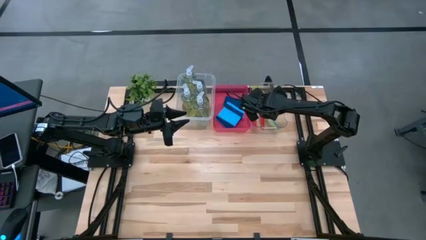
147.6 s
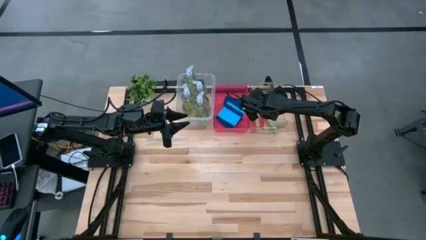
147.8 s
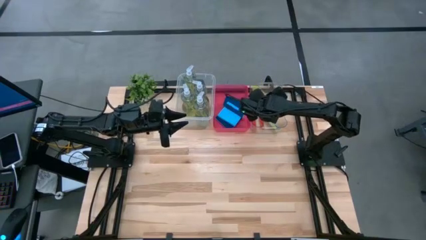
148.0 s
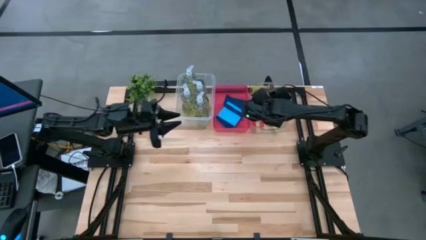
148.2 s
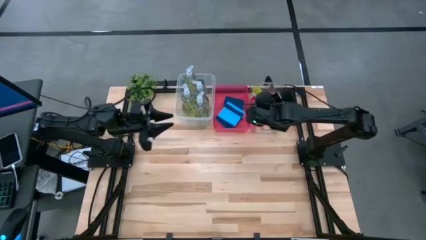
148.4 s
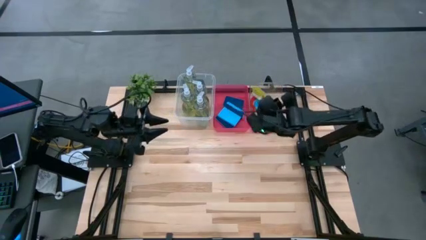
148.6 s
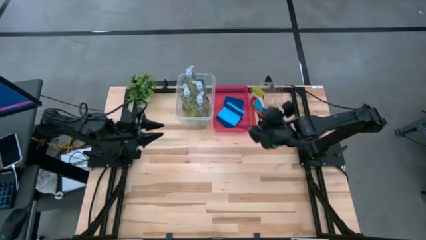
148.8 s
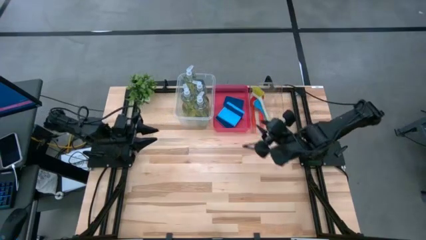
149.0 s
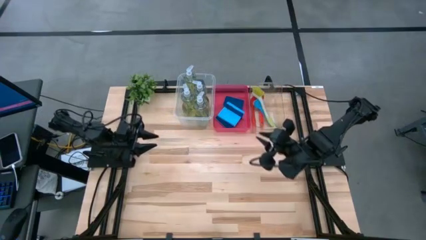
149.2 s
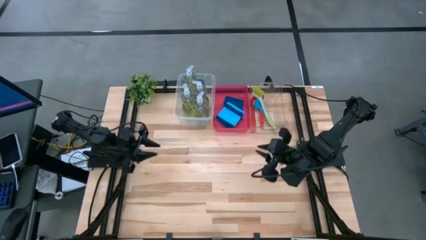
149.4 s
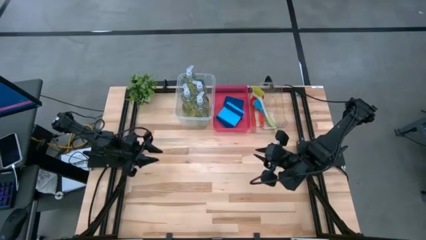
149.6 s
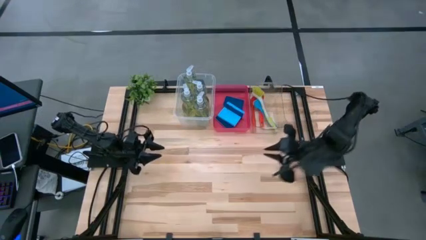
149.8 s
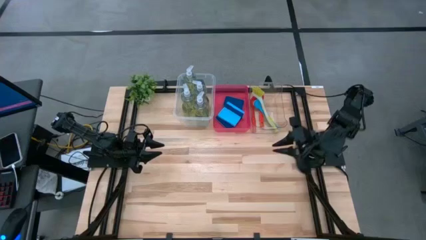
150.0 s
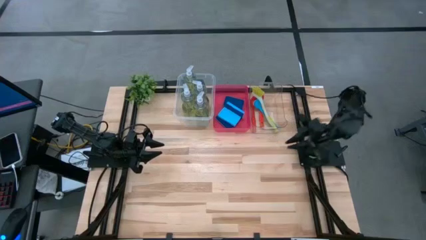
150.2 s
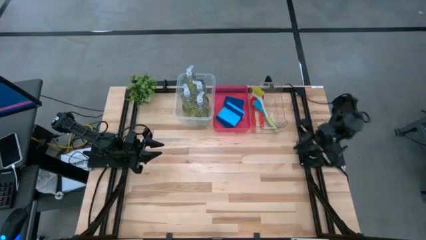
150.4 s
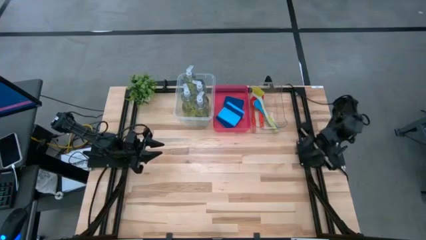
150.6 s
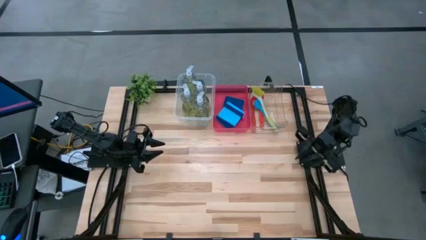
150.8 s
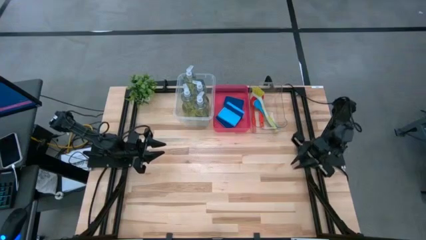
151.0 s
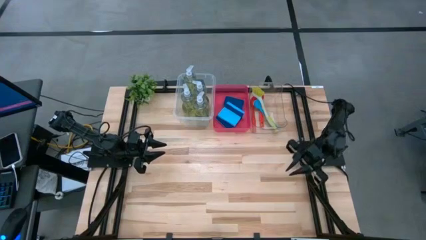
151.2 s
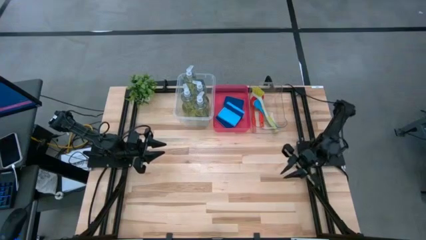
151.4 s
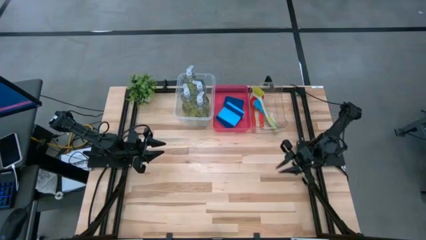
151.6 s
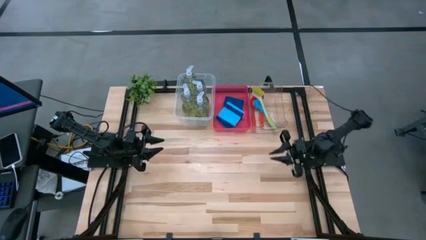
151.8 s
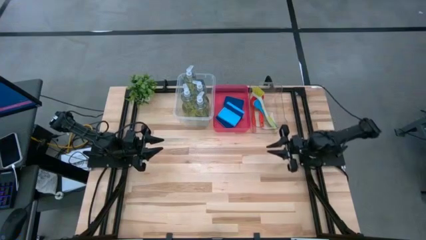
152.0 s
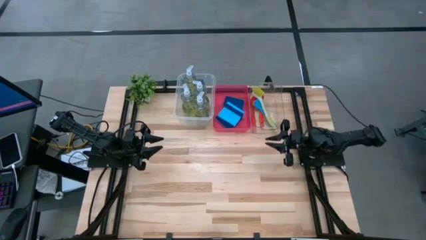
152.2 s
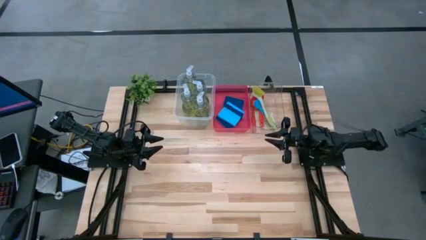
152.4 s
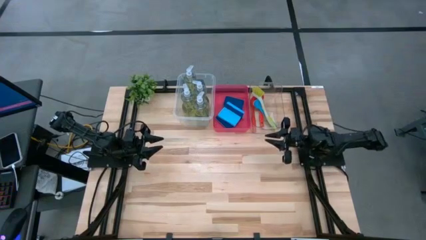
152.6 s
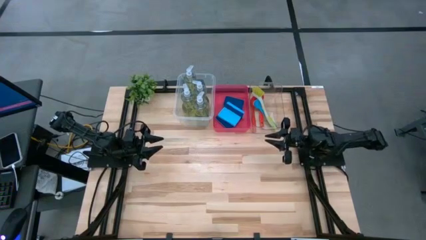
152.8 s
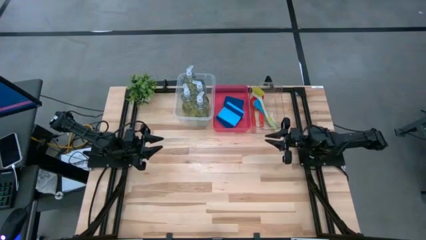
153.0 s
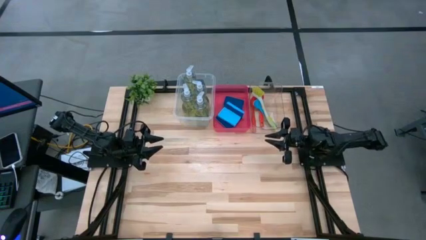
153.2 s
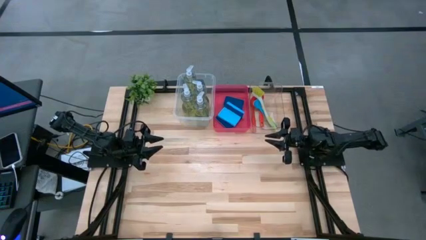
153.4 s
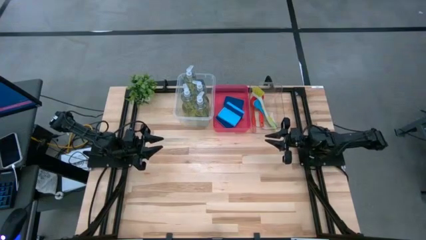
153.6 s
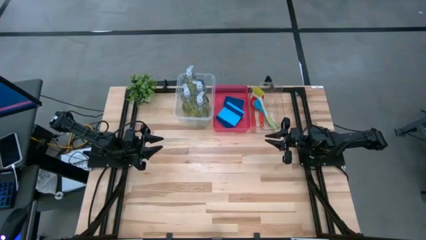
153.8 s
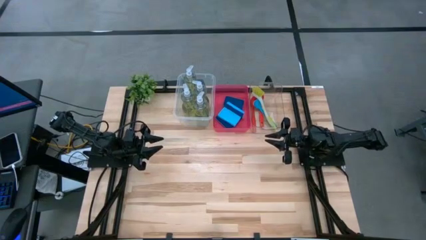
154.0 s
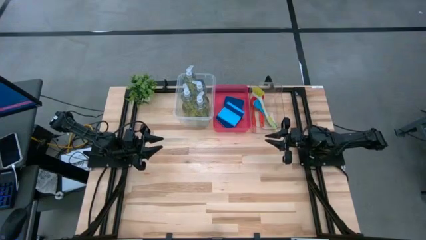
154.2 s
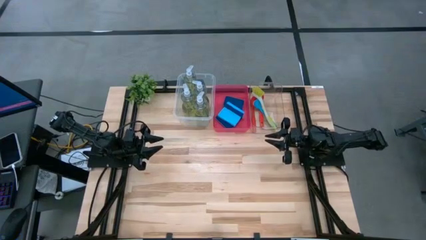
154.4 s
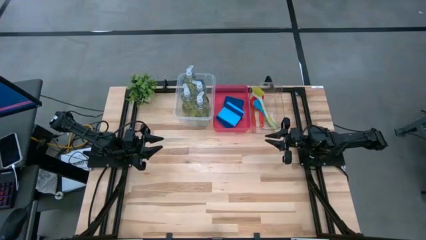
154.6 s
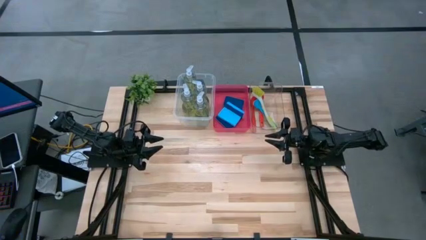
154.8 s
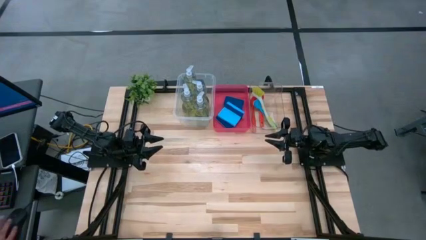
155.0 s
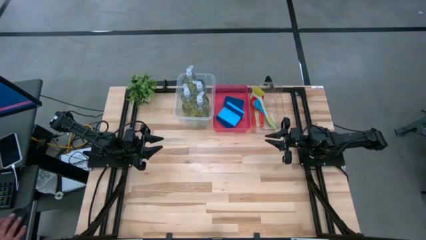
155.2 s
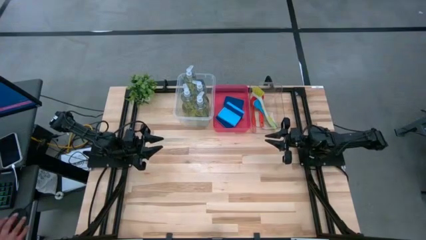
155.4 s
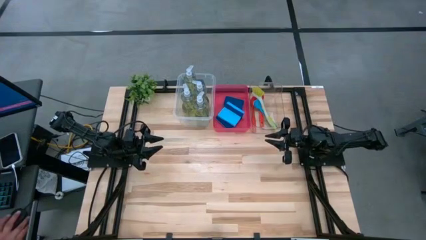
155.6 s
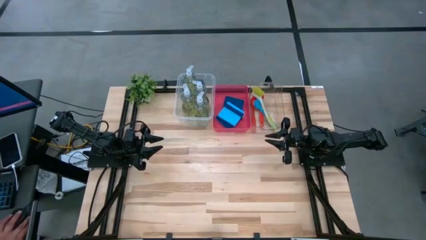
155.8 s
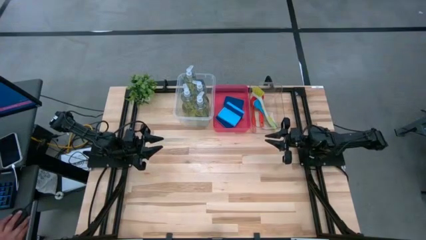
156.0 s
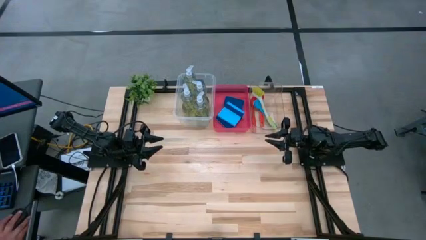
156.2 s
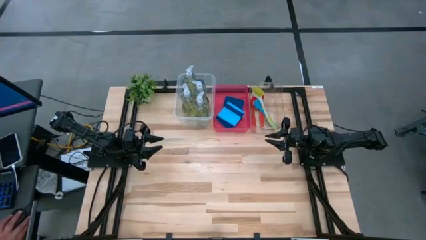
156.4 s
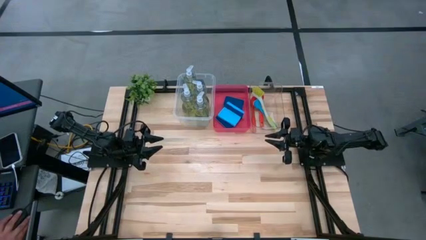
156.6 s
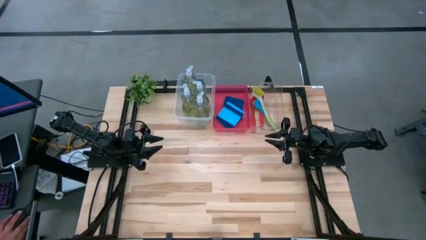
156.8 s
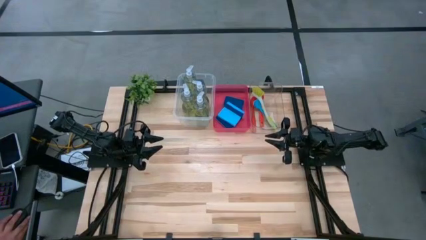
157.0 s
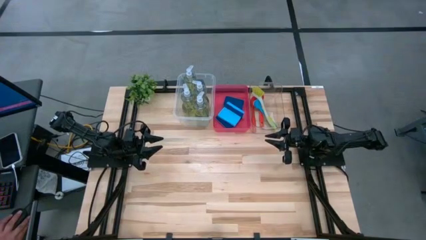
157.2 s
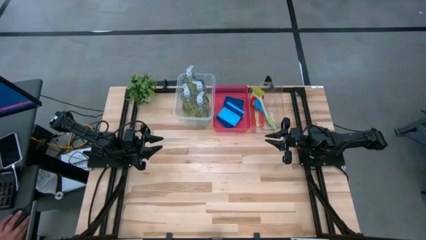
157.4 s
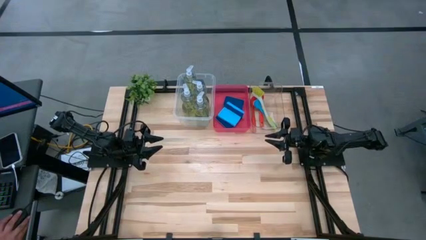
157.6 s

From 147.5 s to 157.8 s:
Task: Pick & Place Kitchen Sink Supplies
Return to home position

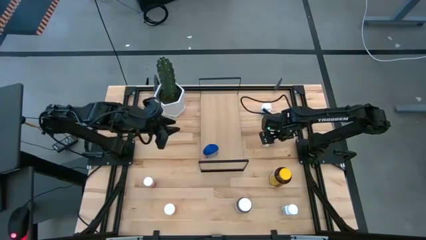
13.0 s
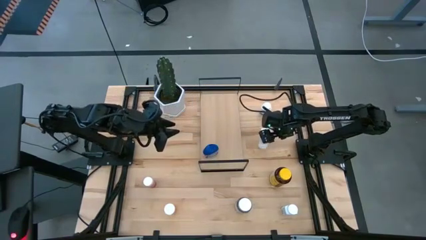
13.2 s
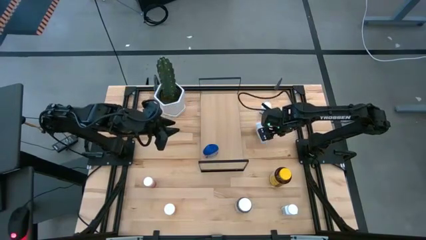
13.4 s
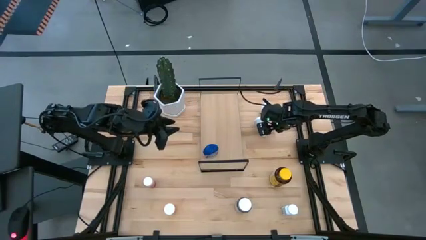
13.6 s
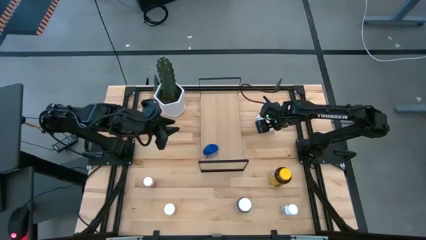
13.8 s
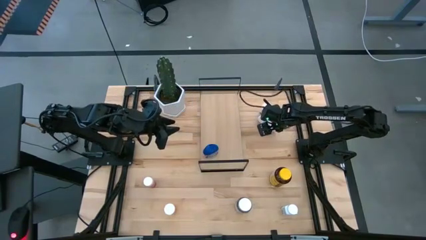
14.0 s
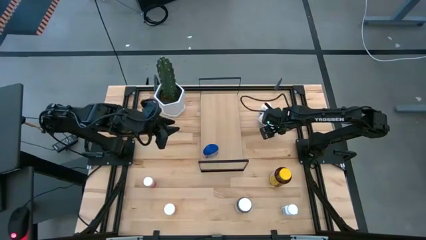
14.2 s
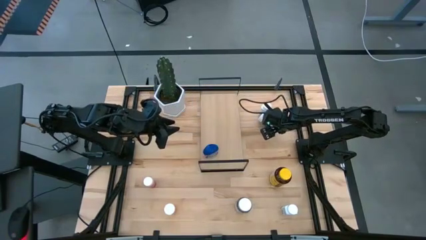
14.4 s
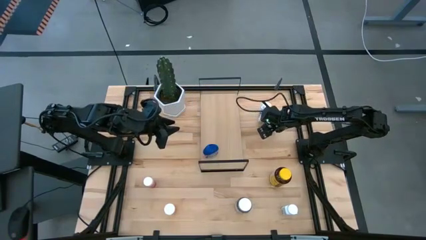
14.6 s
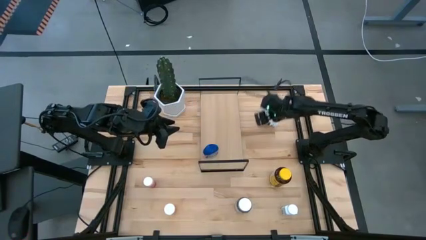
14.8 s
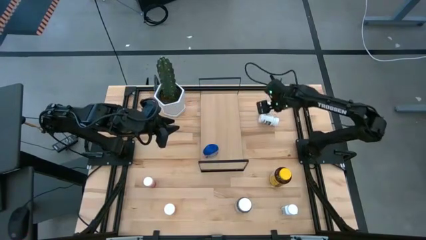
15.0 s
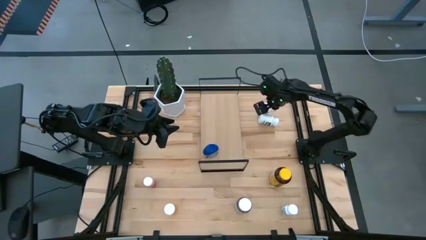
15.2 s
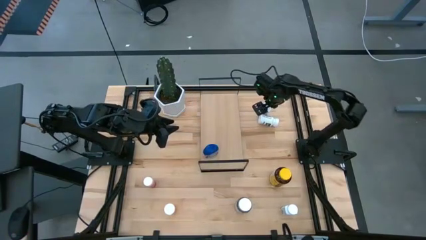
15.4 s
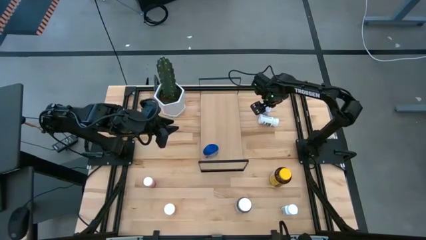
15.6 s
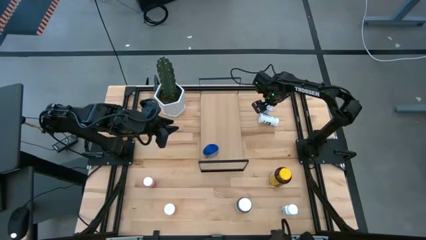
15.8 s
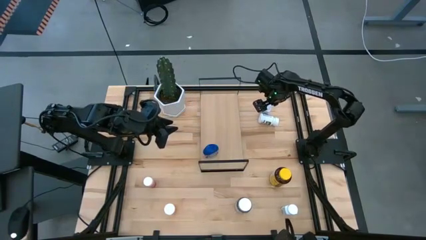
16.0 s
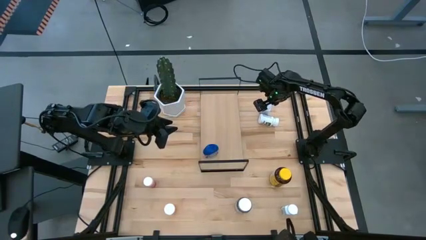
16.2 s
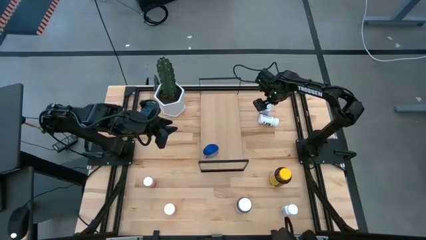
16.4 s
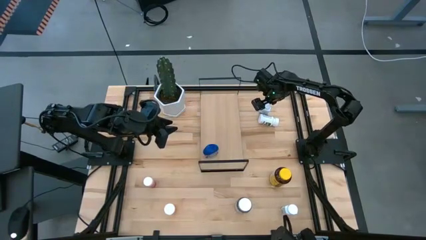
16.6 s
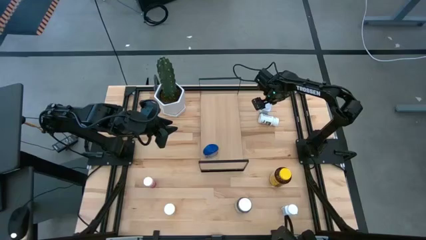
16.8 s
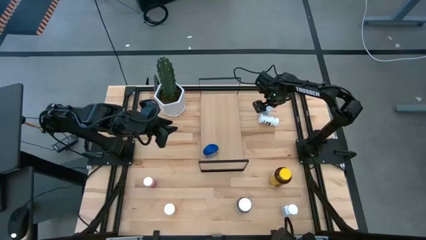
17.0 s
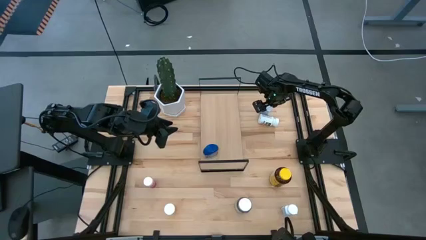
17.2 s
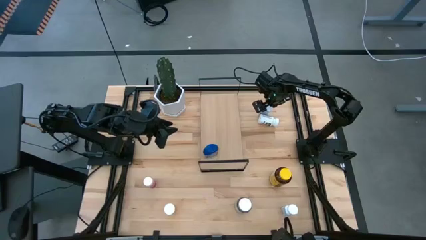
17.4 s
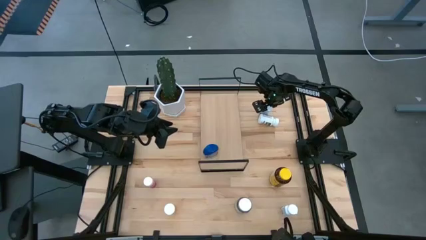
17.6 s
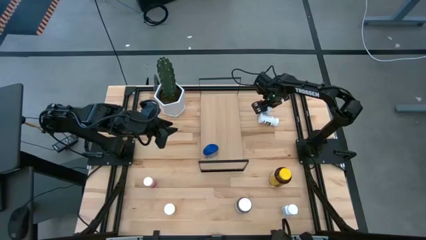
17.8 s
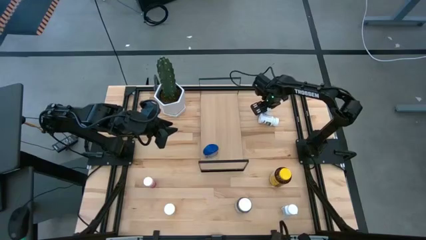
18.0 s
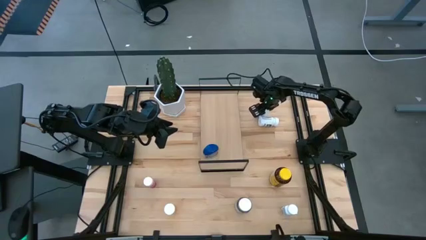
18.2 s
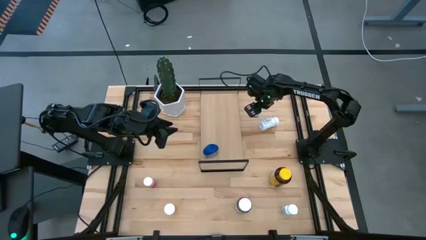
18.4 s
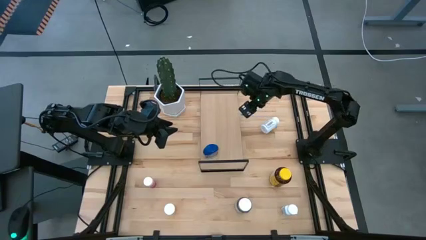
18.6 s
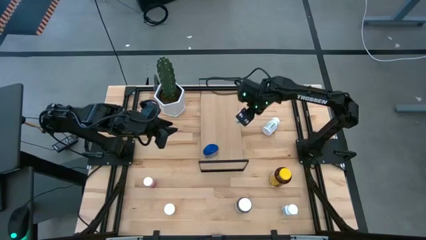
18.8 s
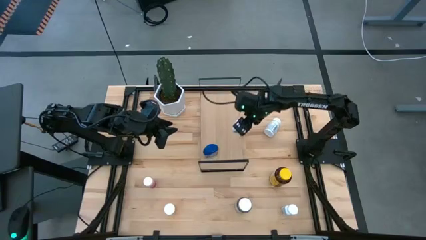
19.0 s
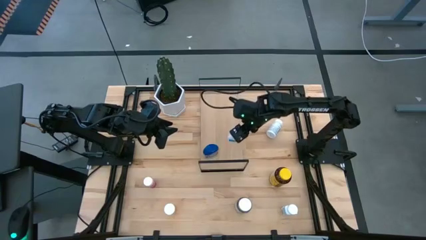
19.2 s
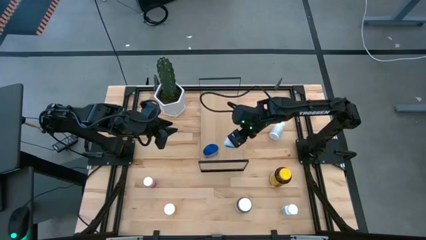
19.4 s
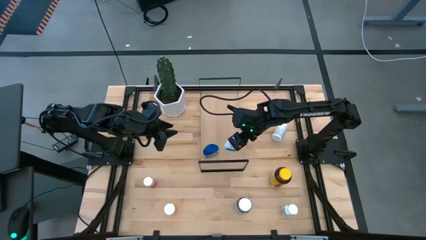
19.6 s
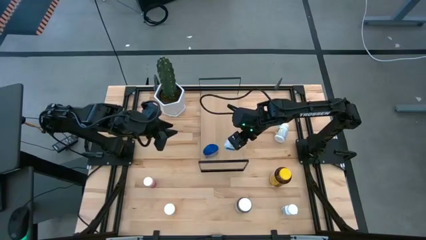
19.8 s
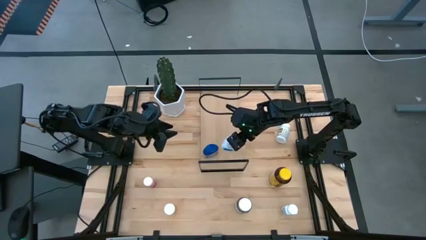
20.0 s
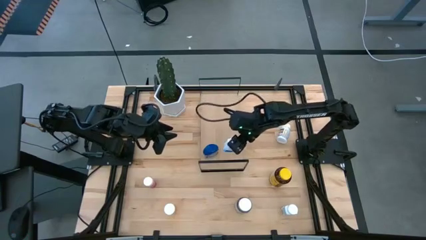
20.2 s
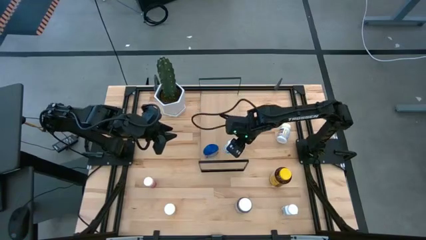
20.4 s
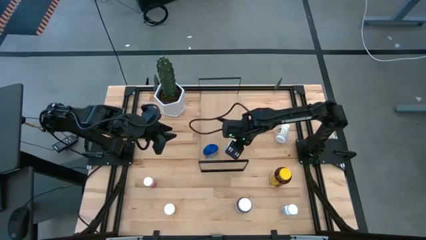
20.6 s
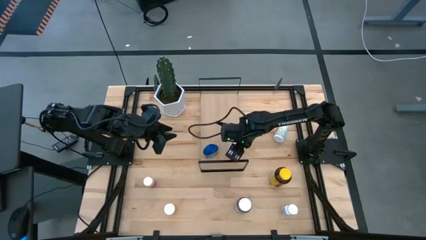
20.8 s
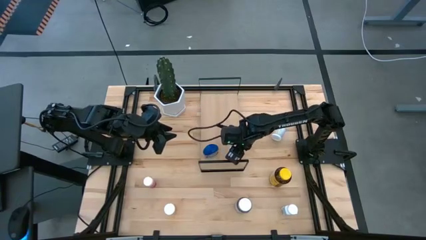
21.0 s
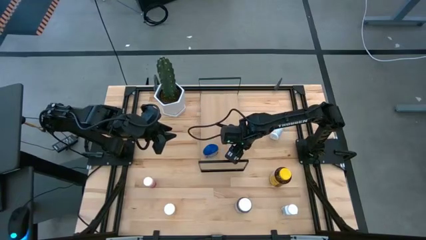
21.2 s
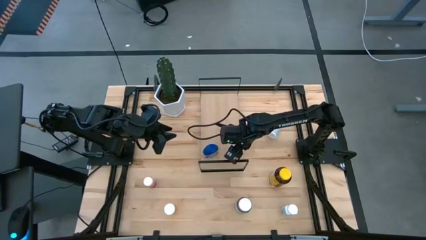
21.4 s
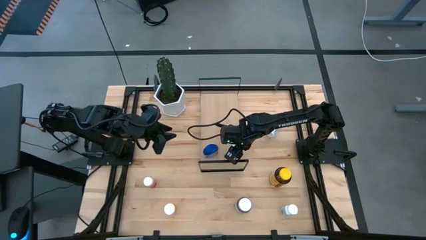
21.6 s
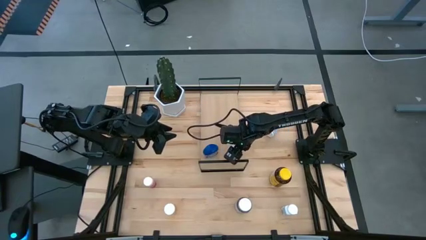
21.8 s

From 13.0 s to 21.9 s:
Task: Pick and place medicine bottles onto shelf by color
Put the top white and blue medicine bottle on the shelf
